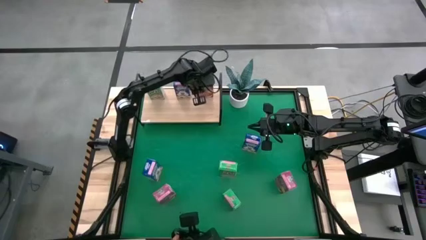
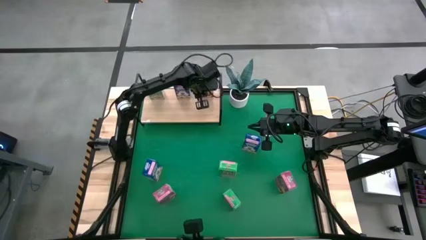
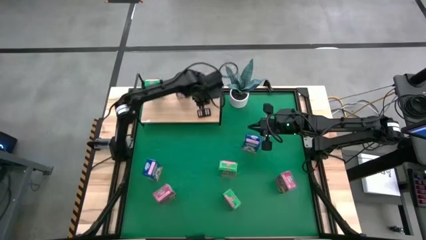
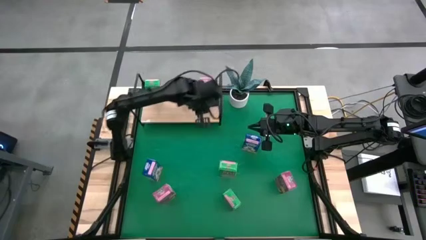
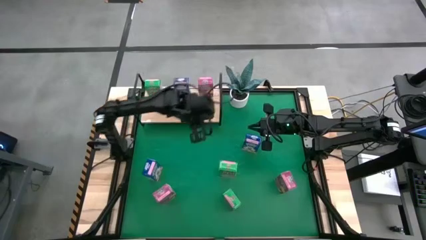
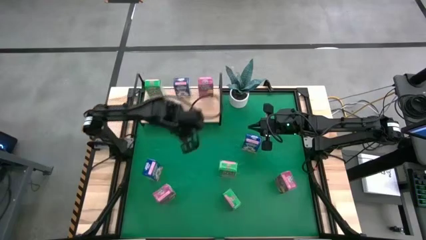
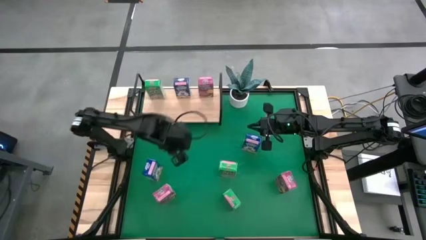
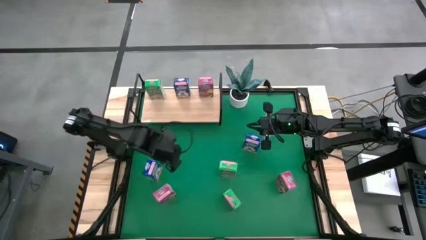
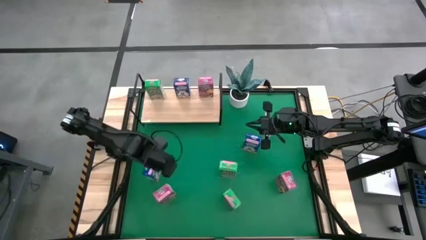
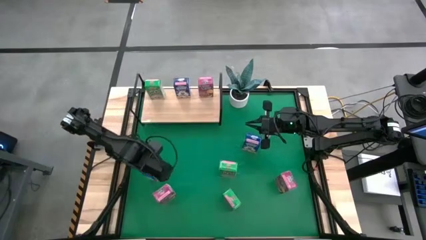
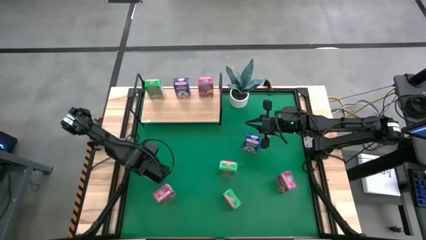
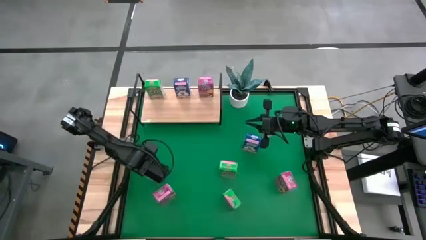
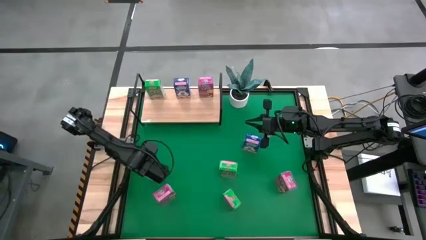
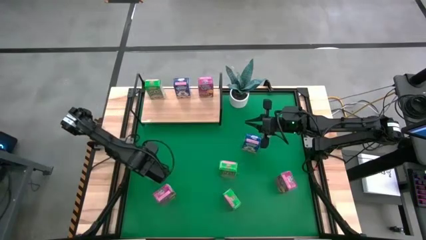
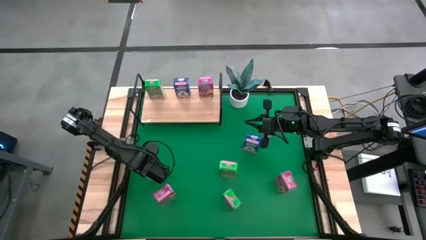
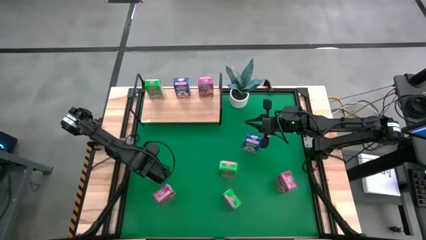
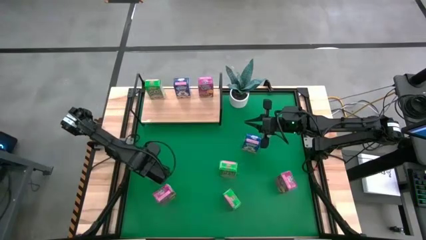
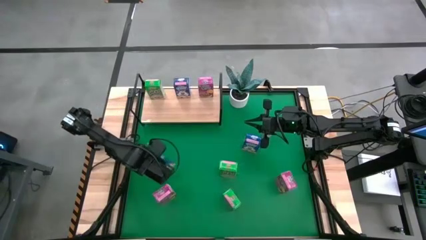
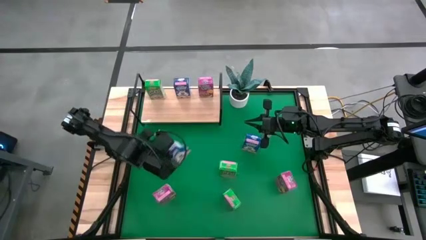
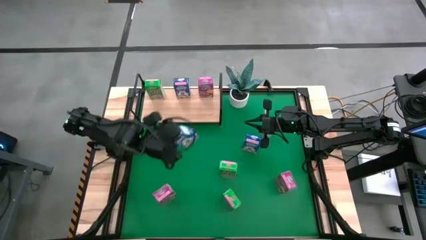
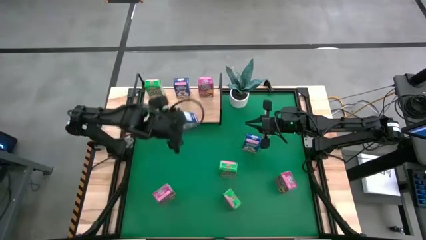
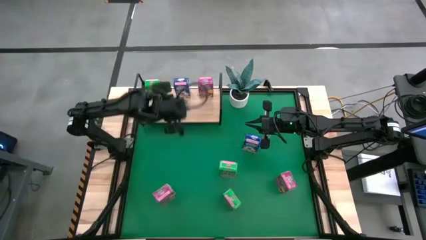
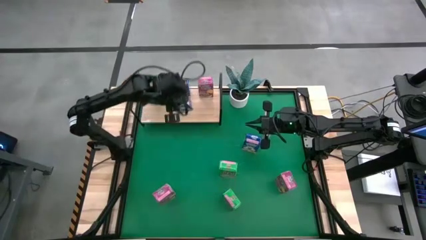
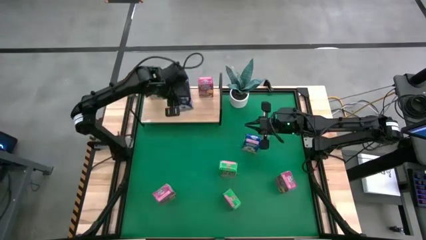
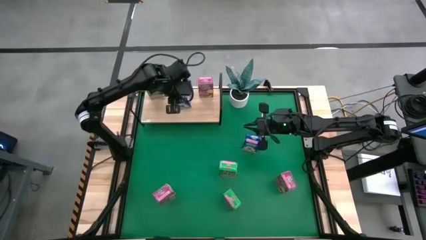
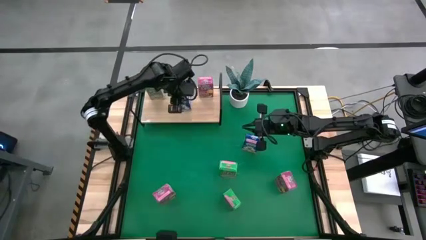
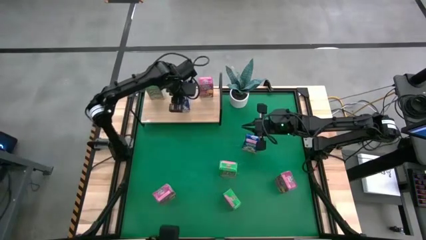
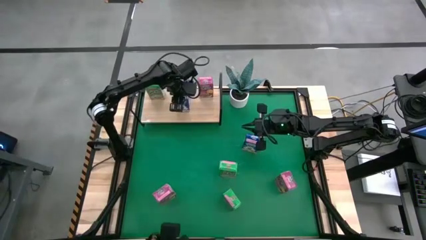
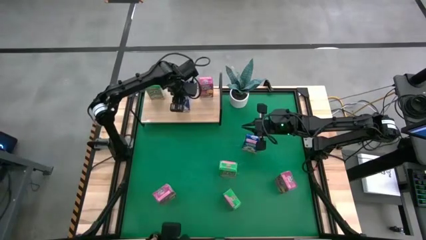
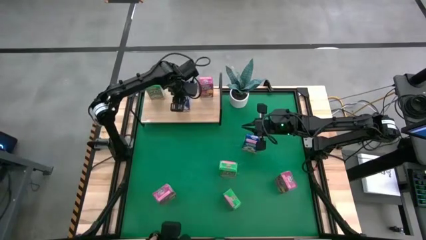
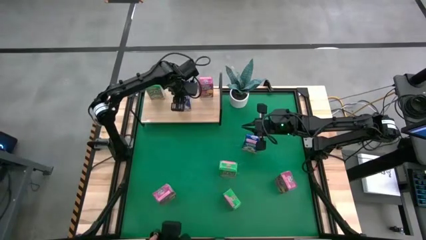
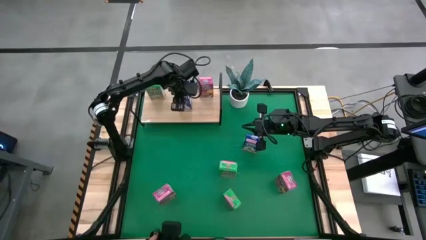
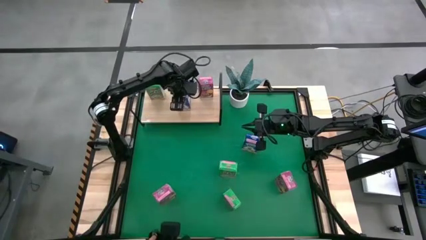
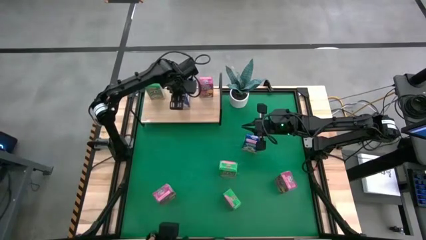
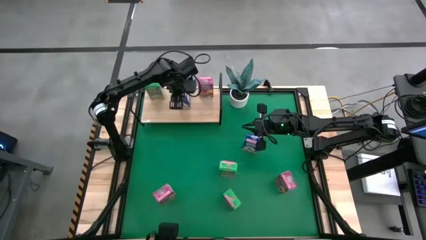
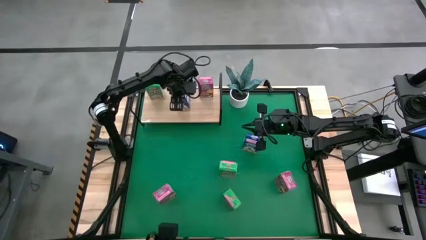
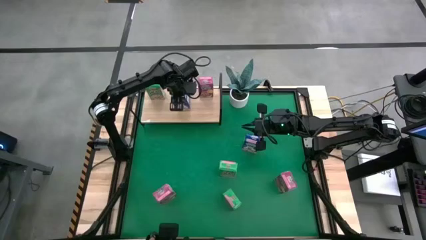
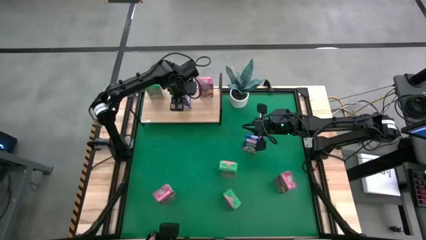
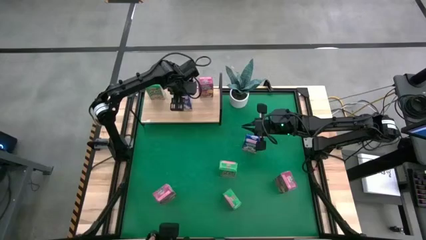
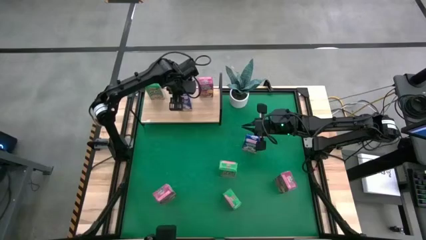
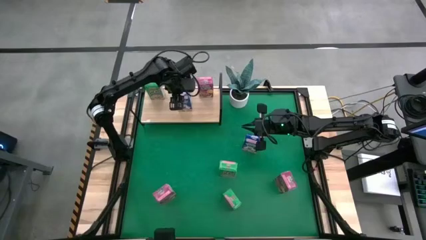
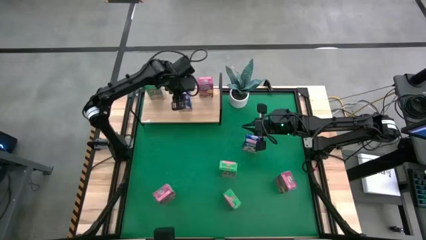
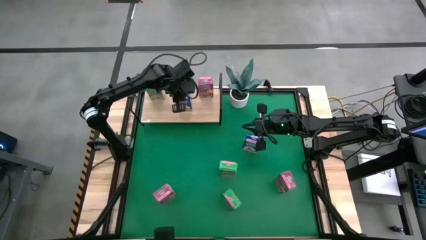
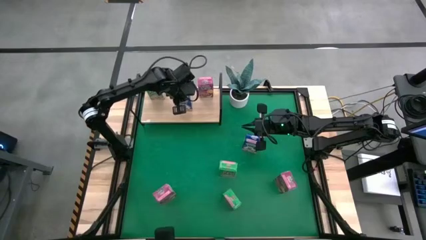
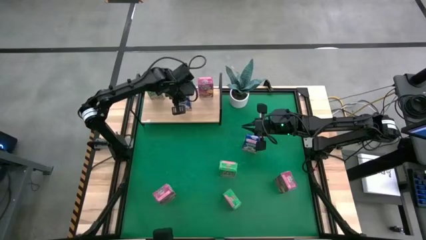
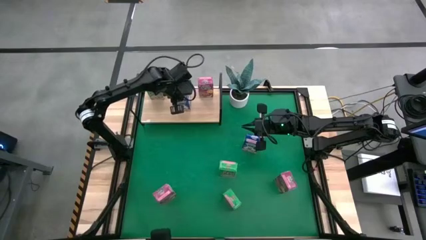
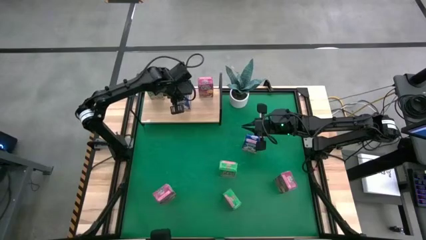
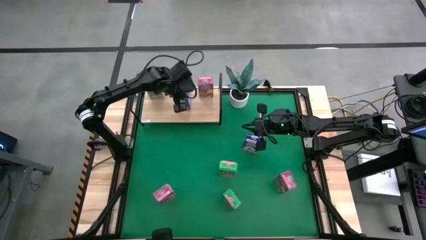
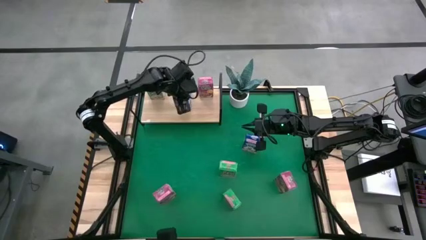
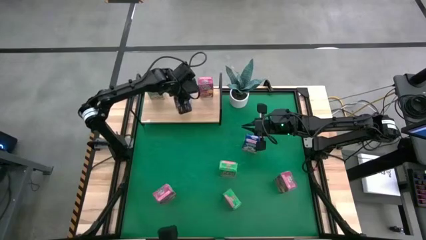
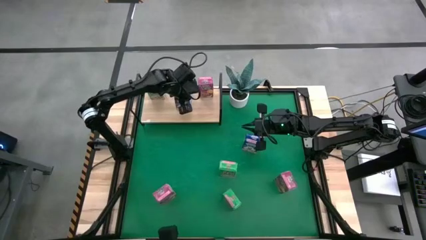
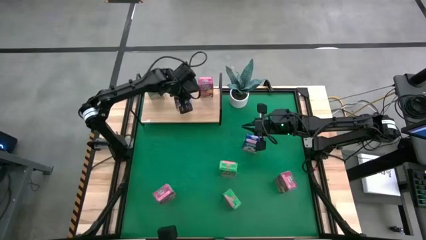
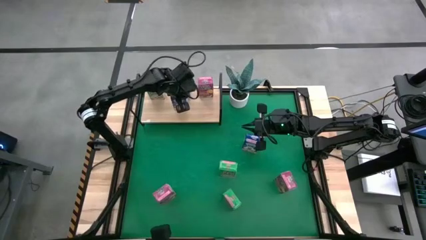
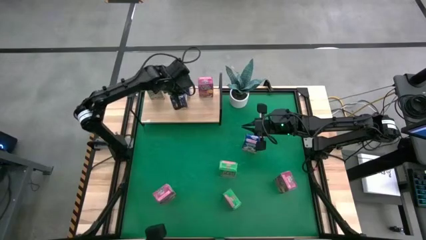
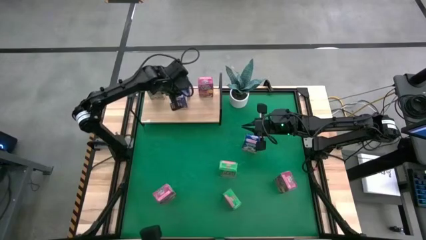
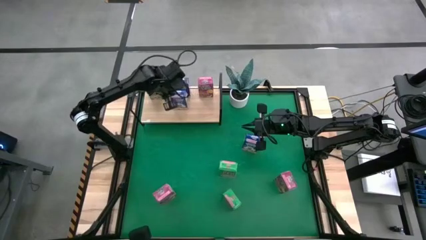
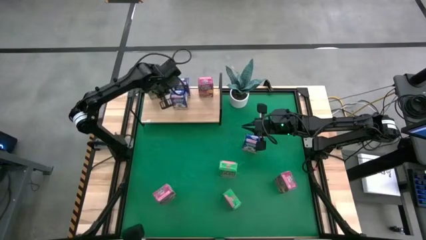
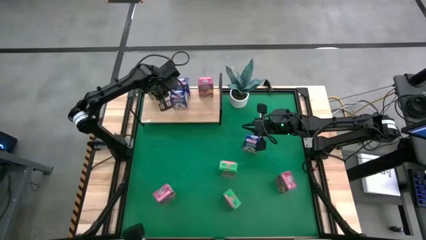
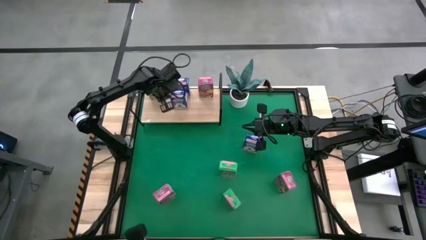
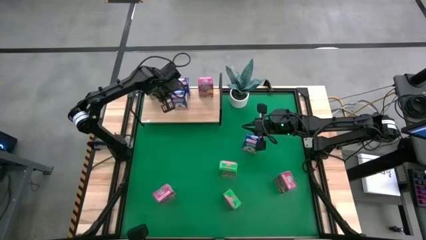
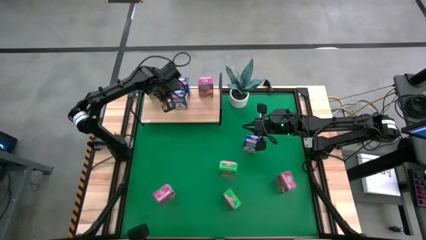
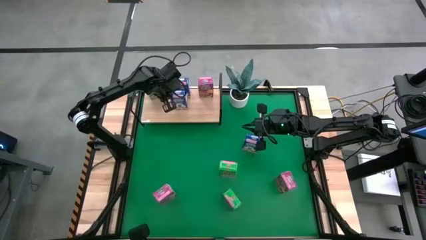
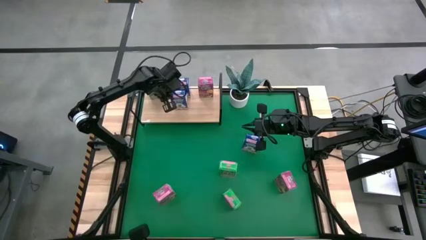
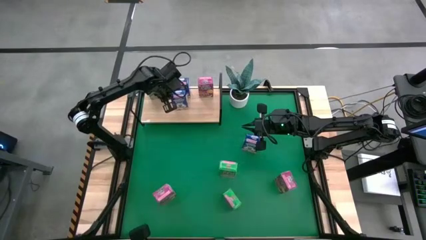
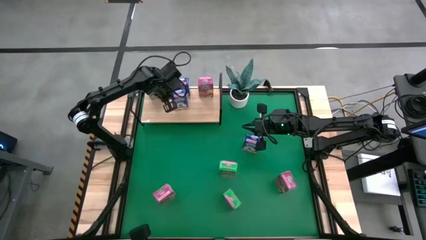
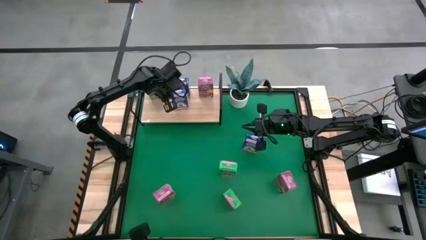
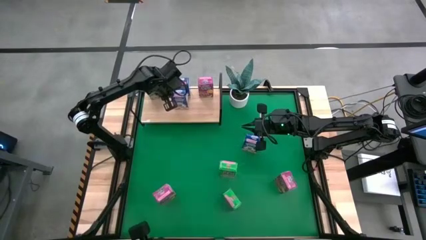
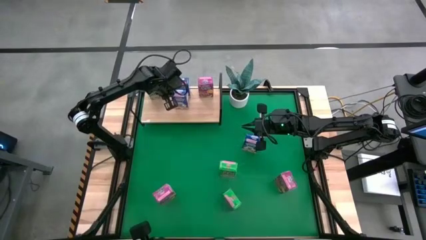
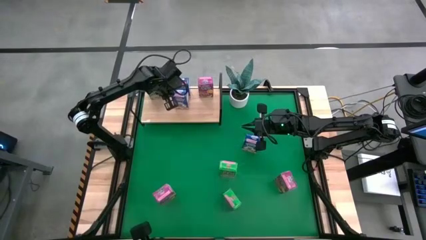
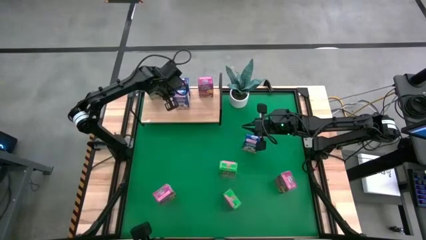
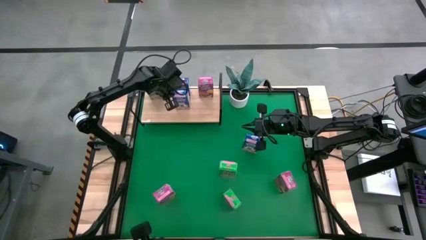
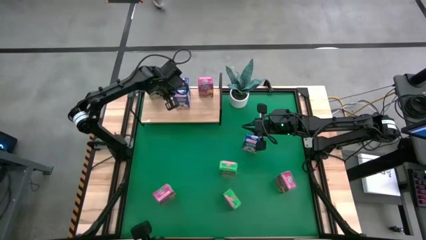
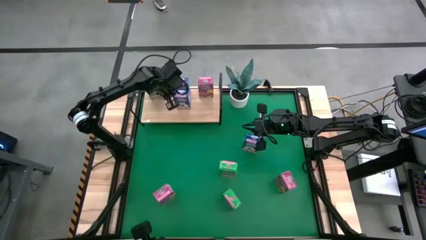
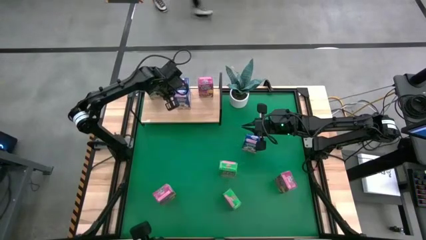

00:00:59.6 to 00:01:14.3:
Task: Stack cereal on shelf
Put the left blue cereal box on the shelf aligned with the other blue cereal box
